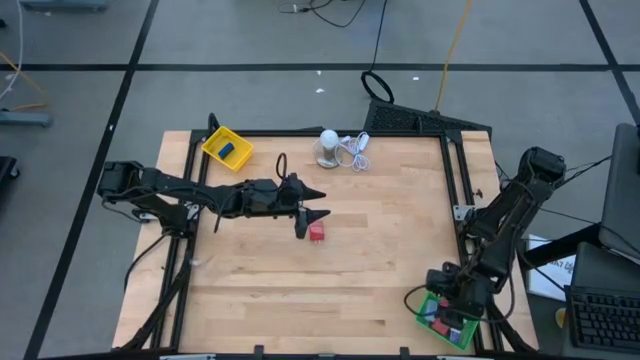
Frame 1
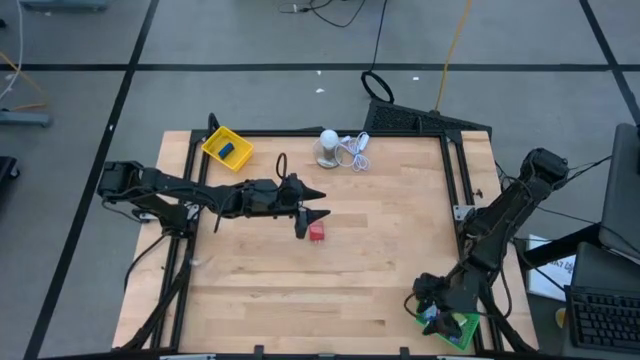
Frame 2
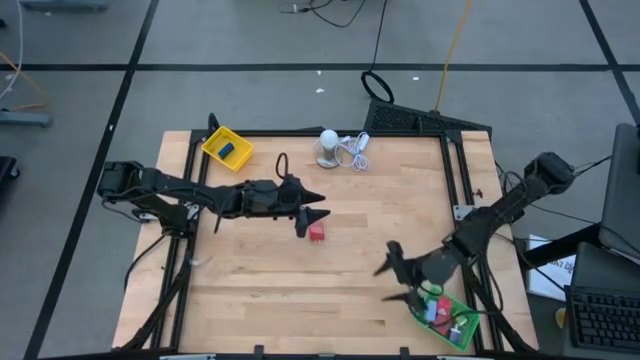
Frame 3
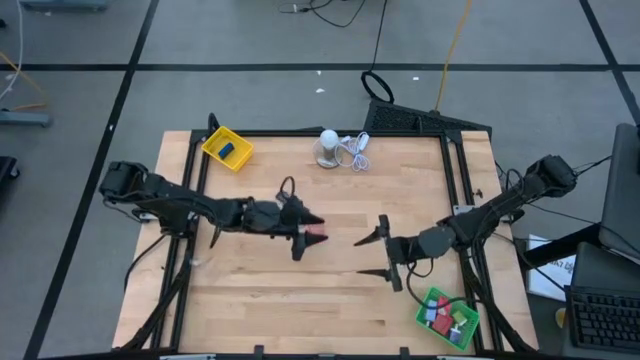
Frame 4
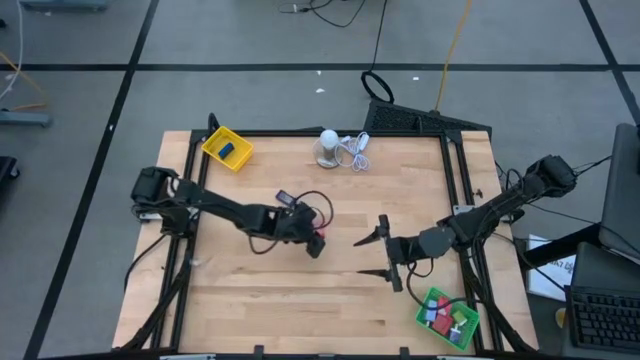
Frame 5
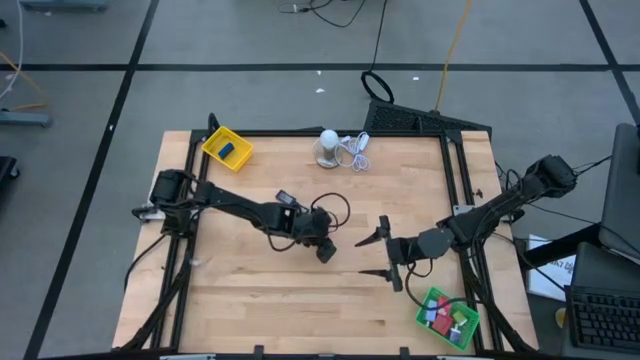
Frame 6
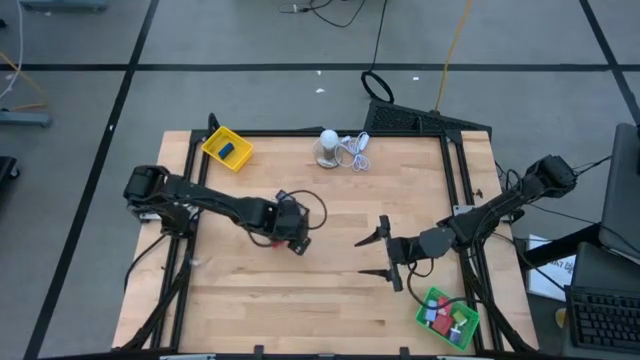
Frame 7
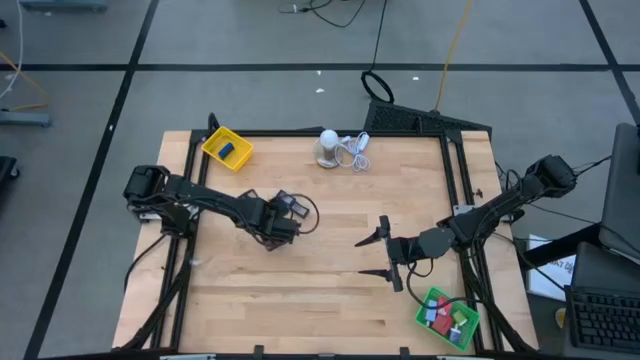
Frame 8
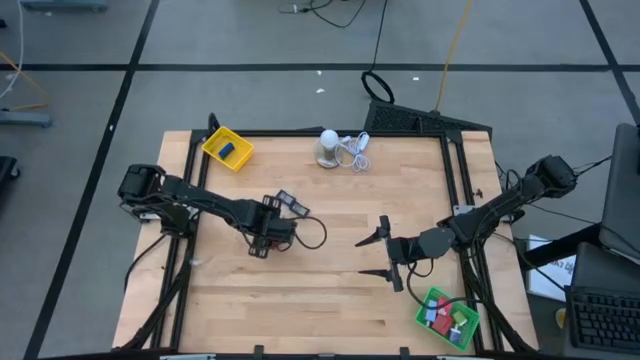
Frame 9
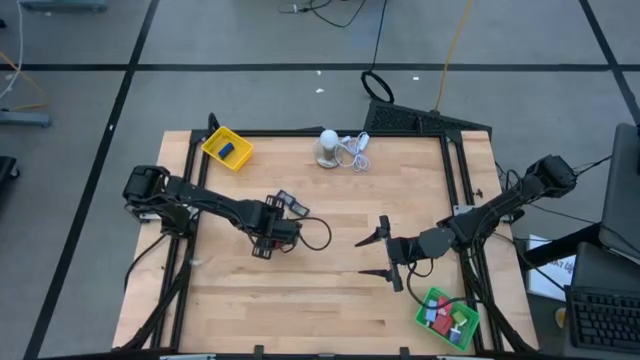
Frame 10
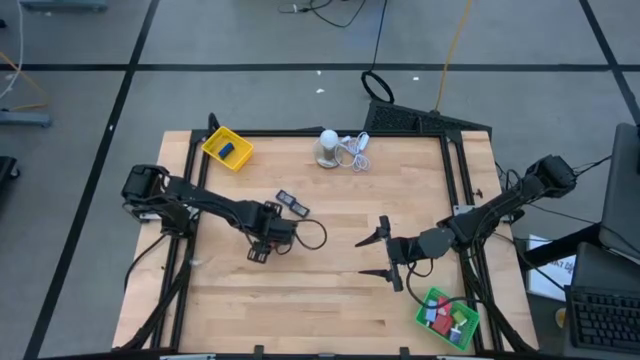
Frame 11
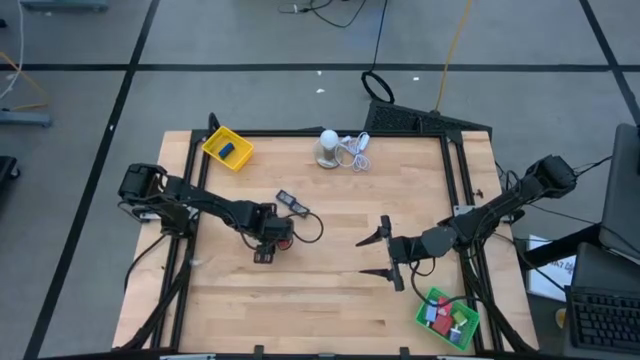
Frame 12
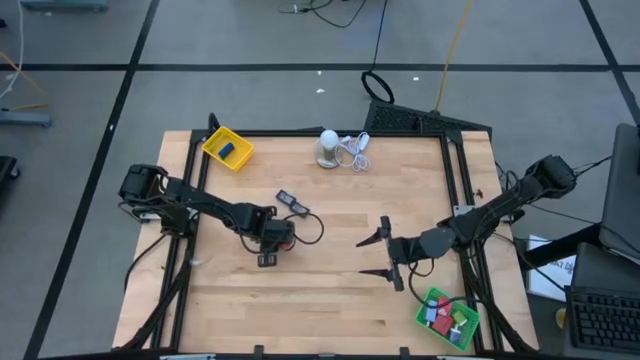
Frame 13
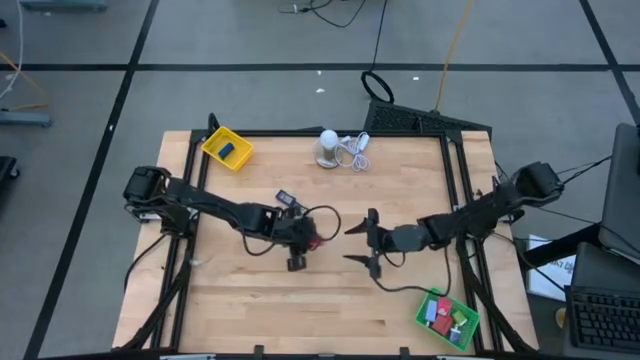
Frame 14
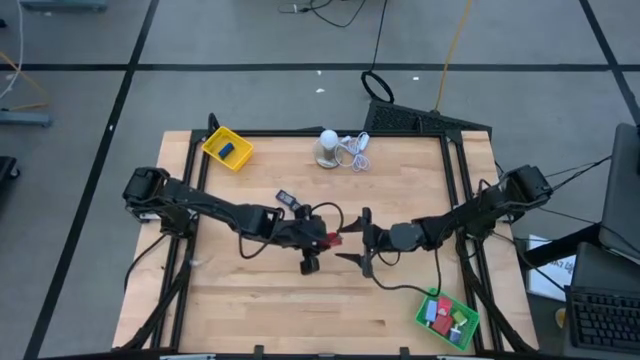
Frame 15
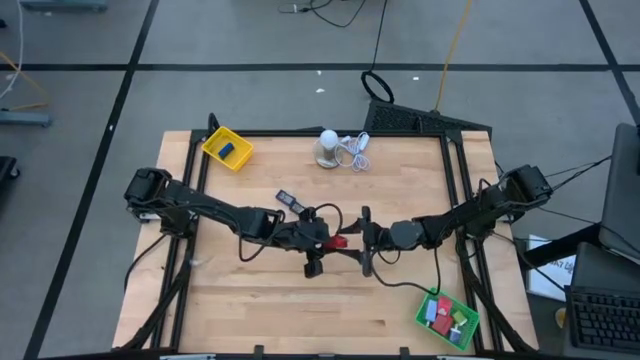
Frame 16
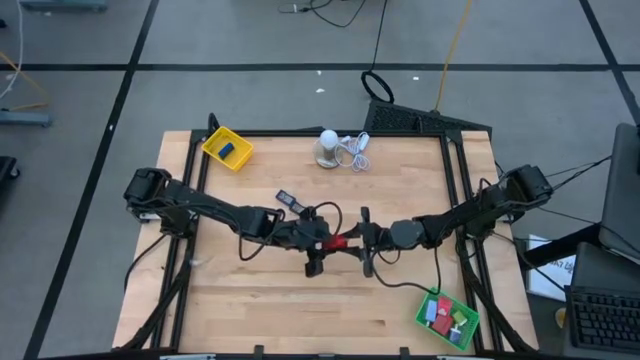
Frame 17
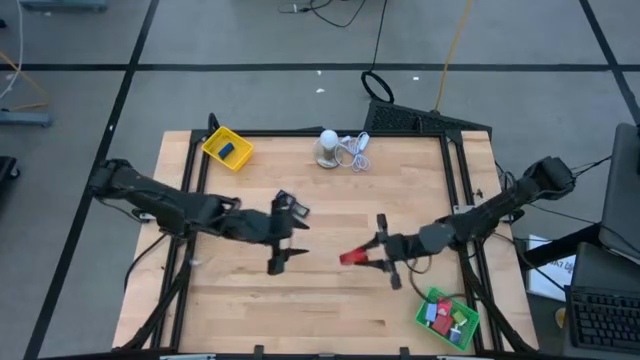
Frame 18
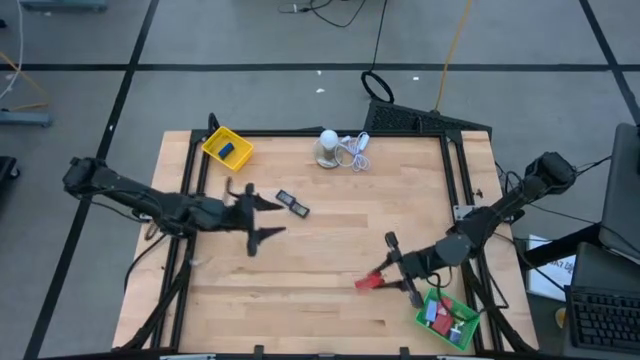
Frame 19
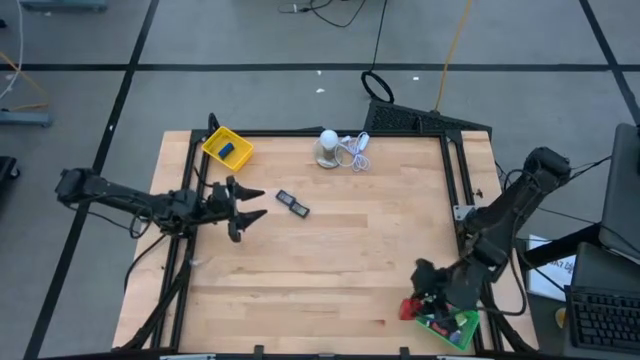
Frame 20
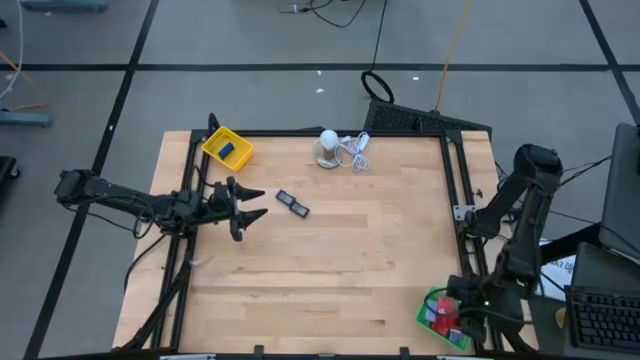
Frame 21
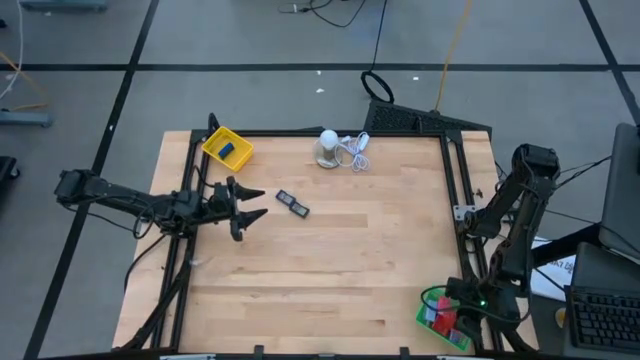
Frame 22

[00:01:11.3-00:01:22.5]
Task: Pick & Place Office items
Put the red charger adapter into the green bin

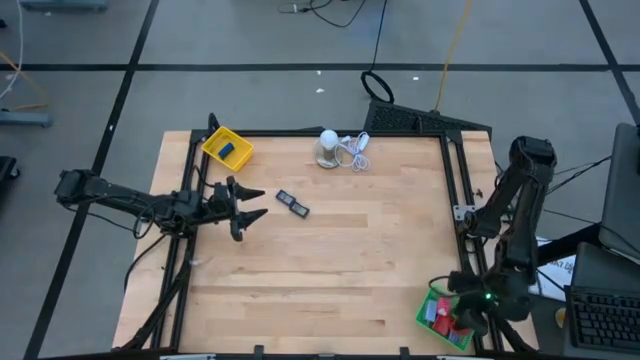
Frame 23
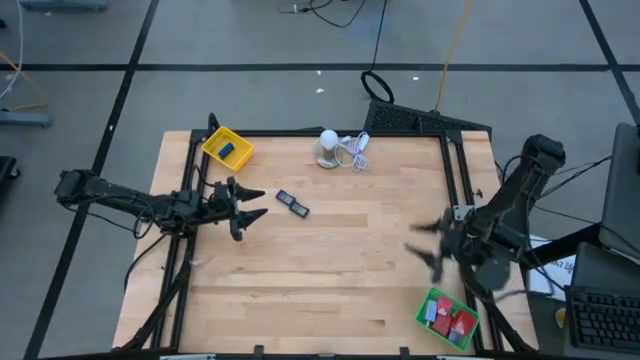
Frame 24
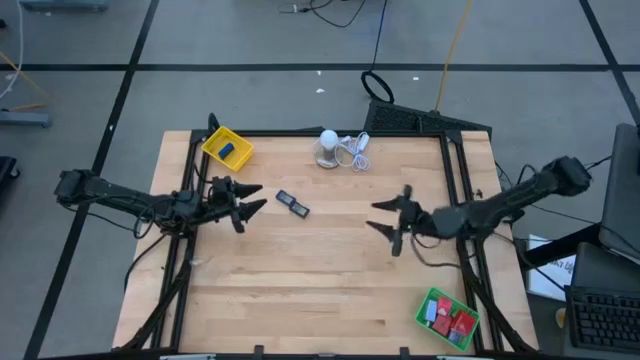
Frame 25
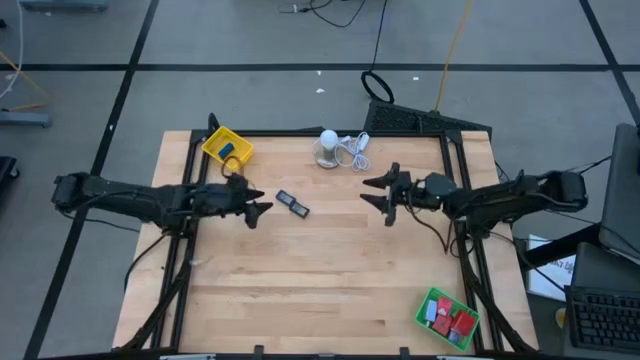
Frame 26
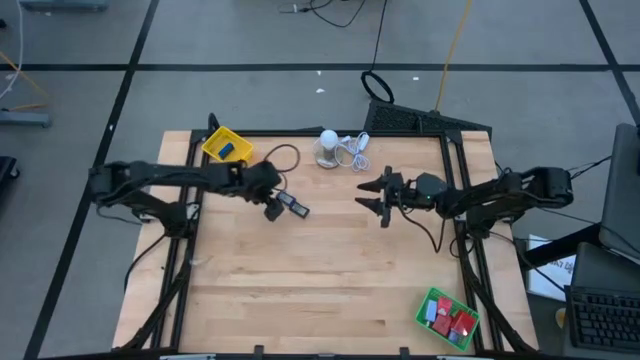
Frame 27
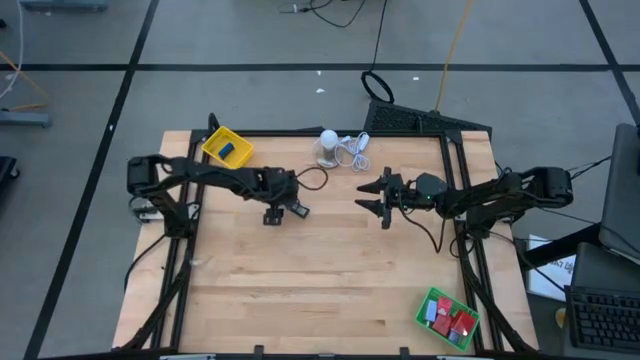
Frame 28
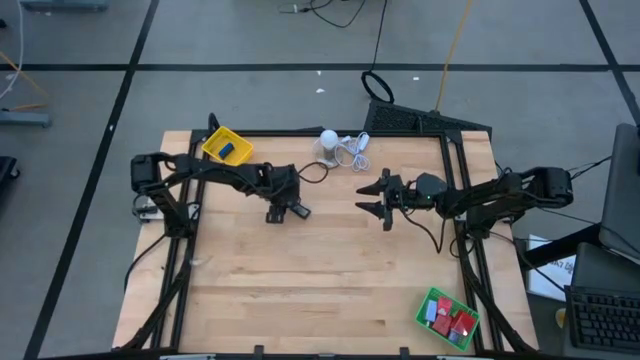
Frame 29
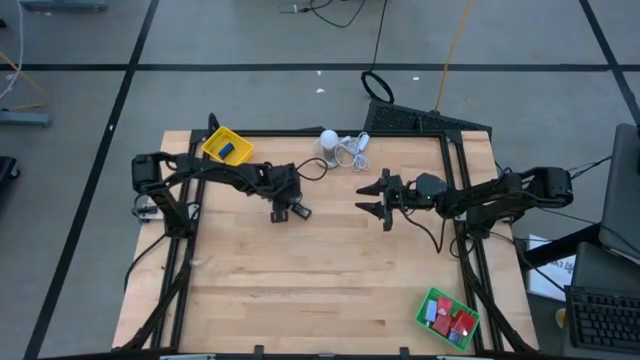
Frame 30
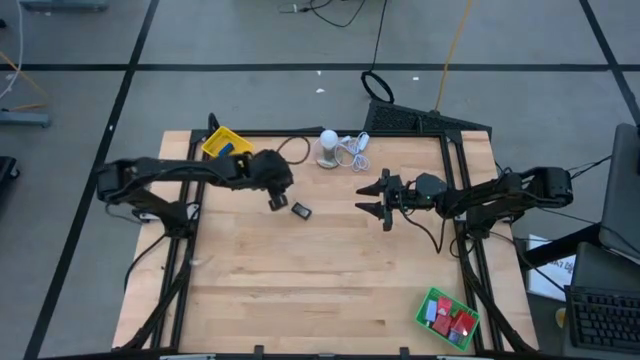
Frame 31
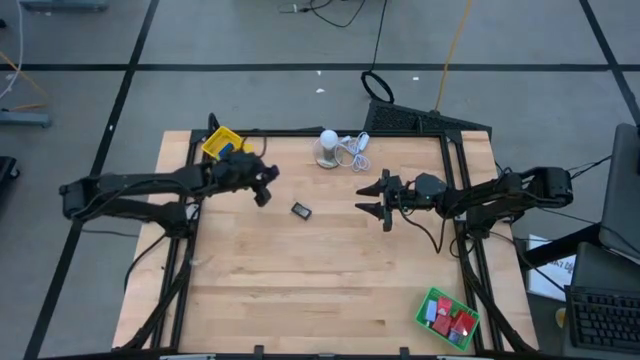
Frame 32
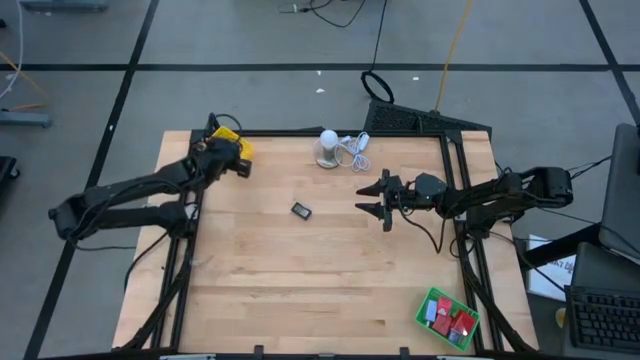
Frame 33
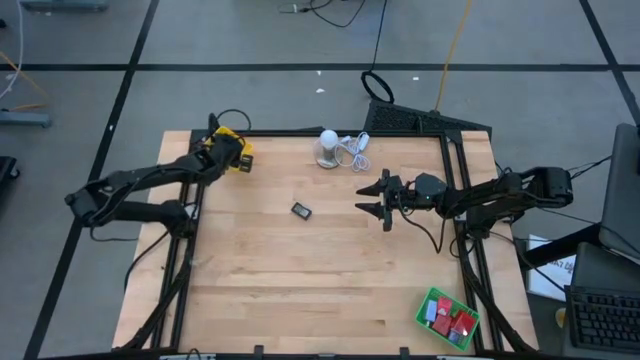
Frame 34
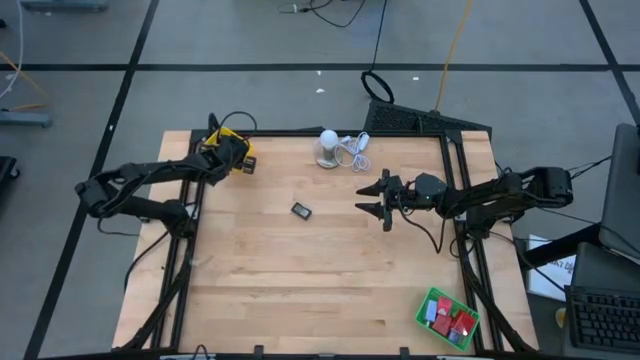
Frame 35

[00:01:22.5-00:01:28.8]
Put the dark blue digital clock into the yellow bin

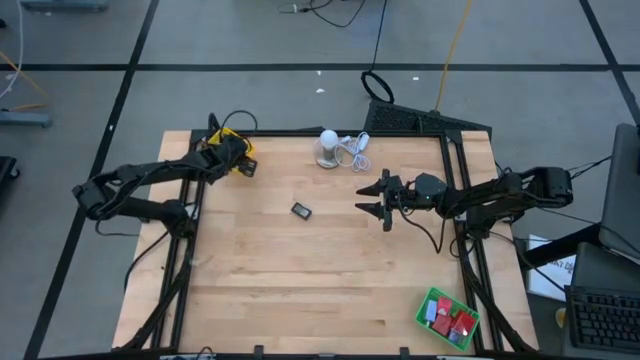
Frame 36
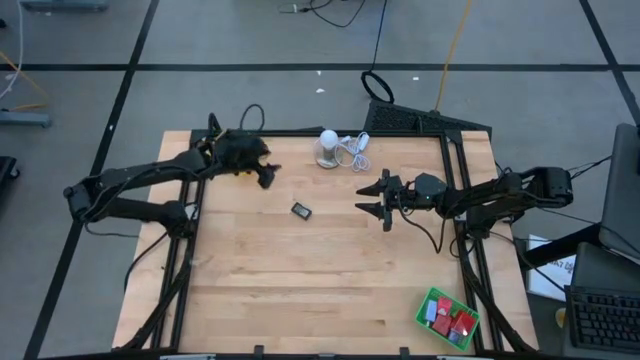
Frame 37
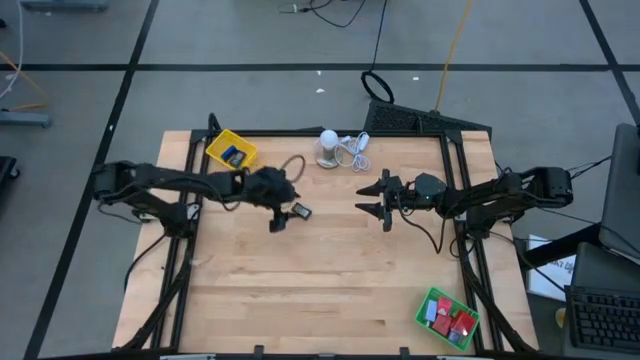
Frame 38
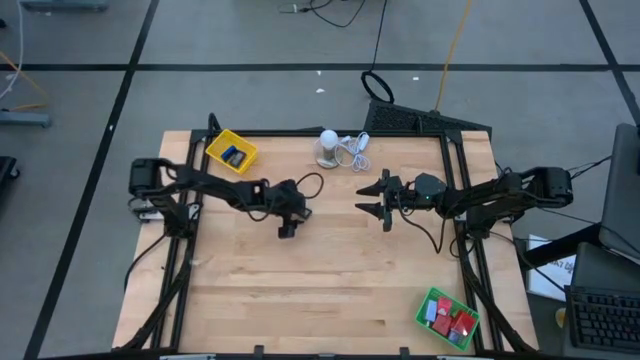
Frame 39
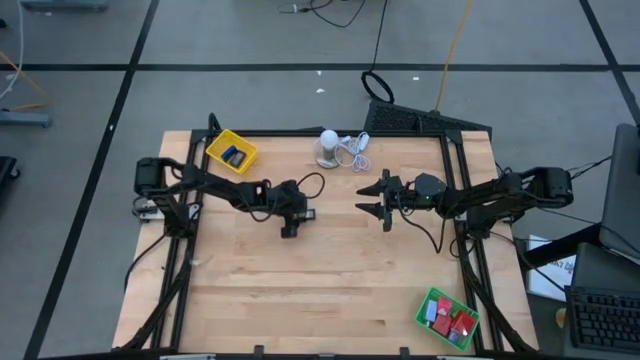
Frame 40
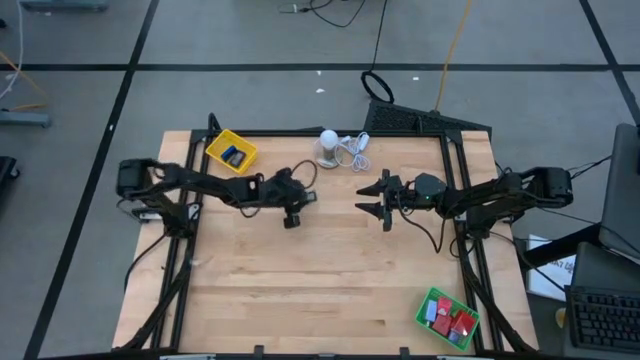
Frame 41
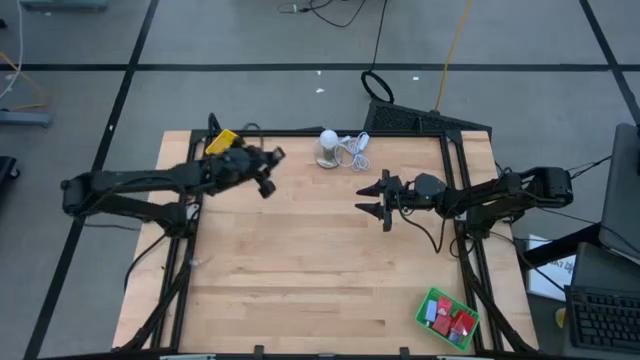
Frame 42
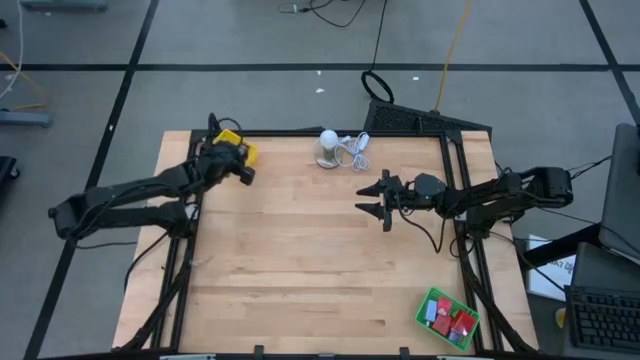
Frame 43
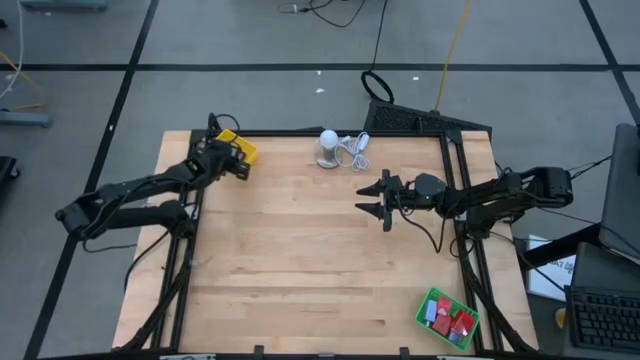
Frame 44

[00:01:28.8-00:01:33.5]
Put the black digital clock into the yellow bin
